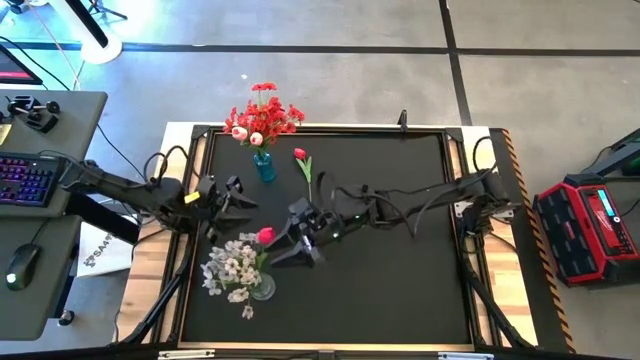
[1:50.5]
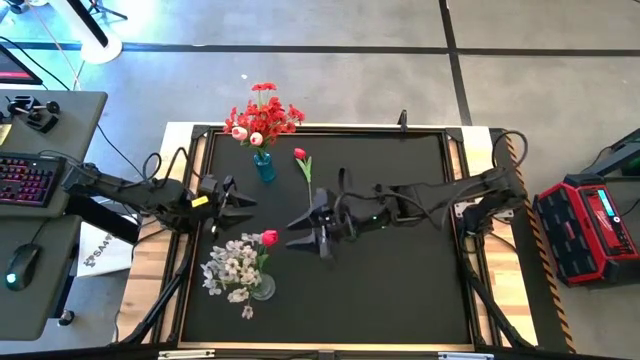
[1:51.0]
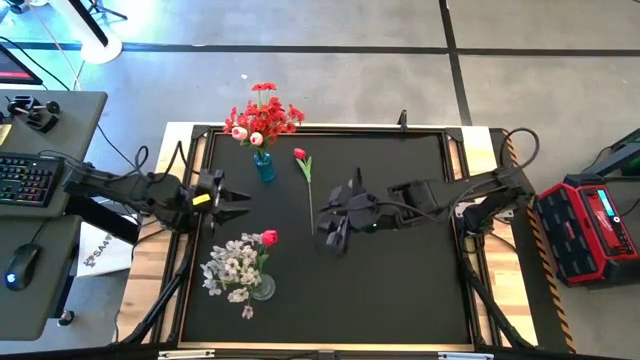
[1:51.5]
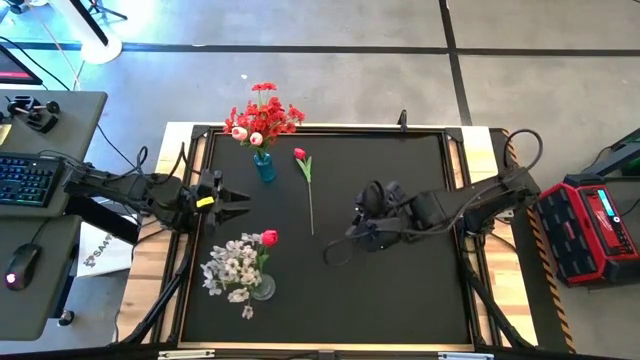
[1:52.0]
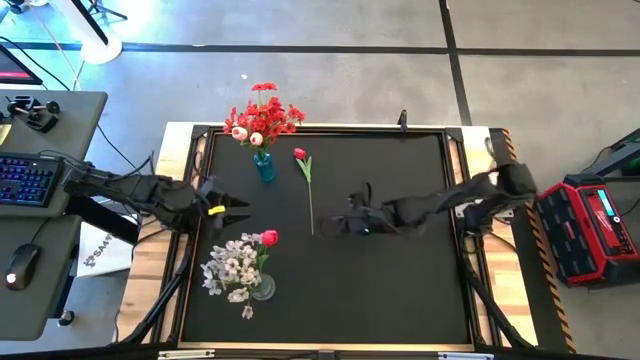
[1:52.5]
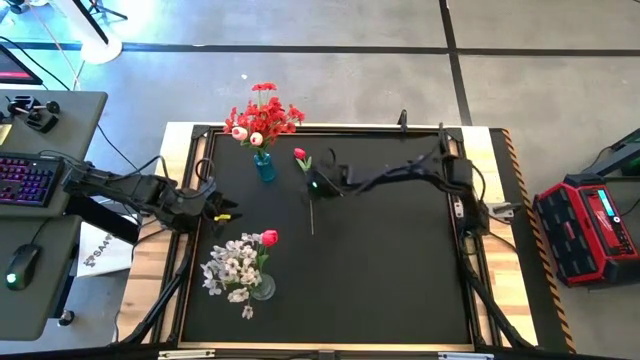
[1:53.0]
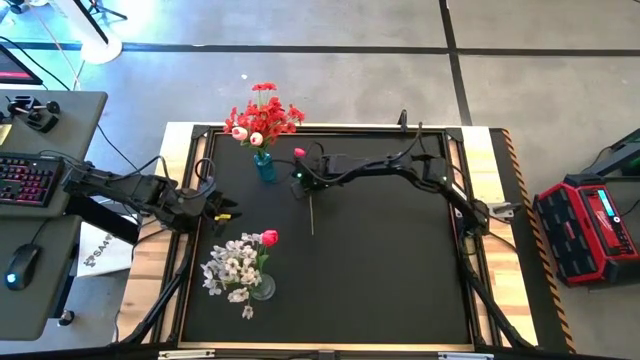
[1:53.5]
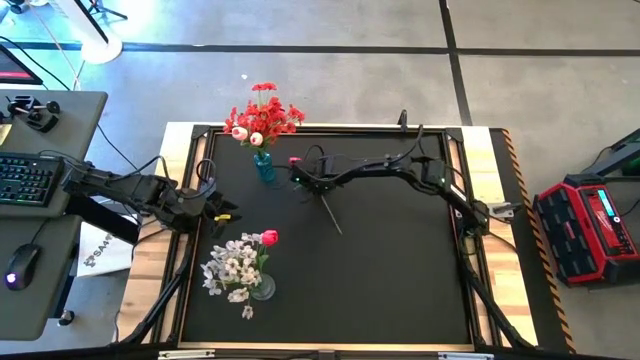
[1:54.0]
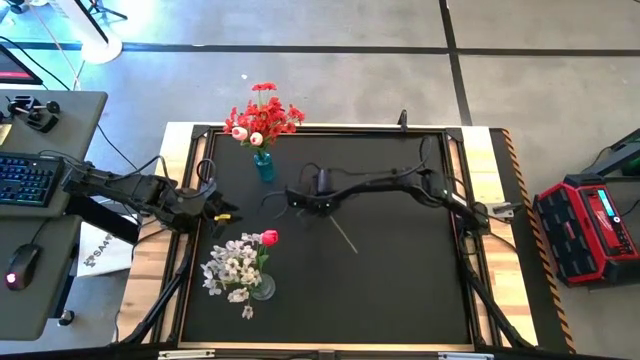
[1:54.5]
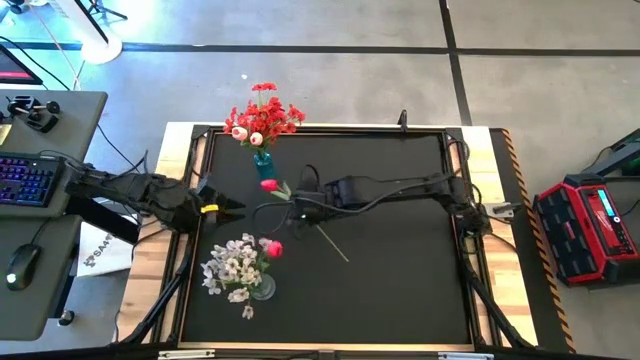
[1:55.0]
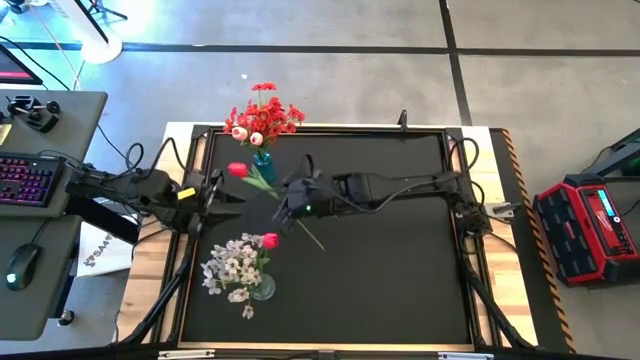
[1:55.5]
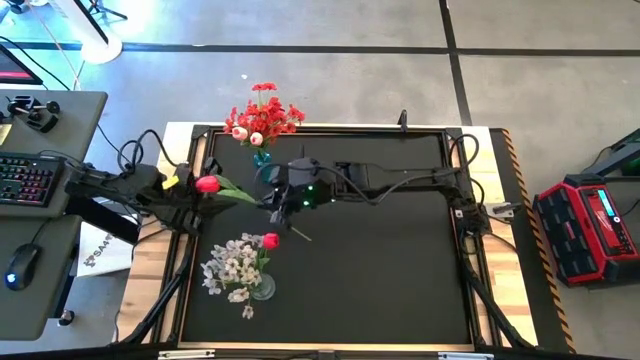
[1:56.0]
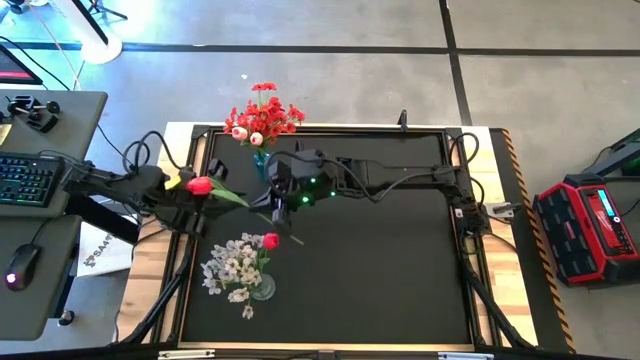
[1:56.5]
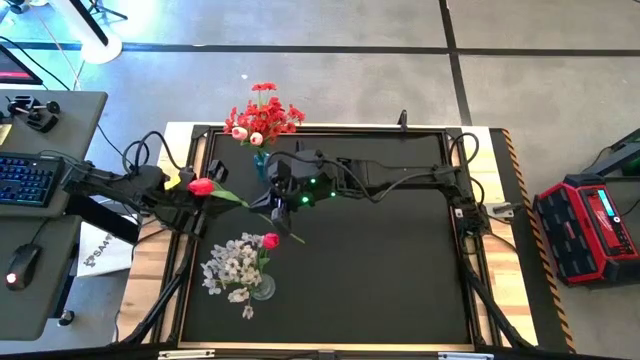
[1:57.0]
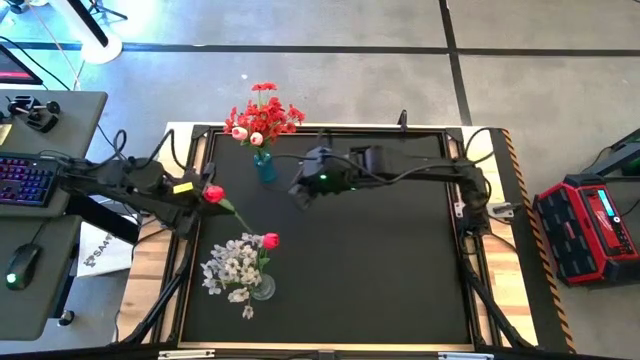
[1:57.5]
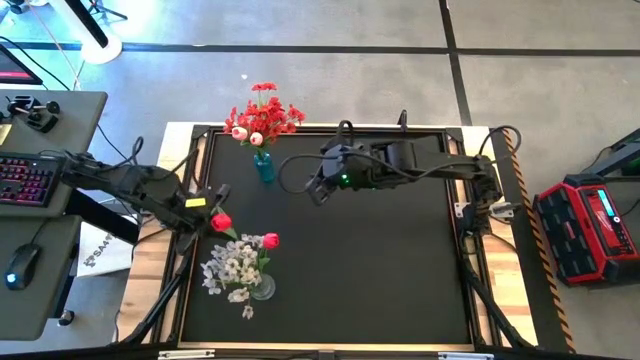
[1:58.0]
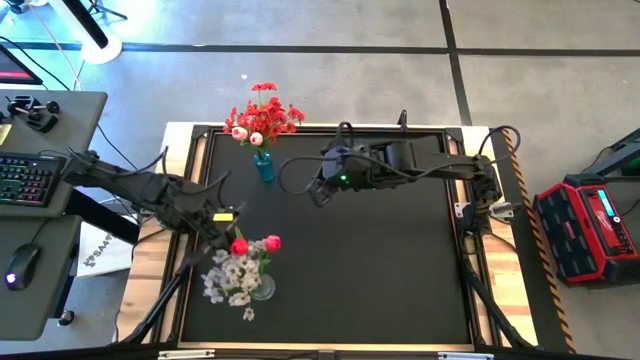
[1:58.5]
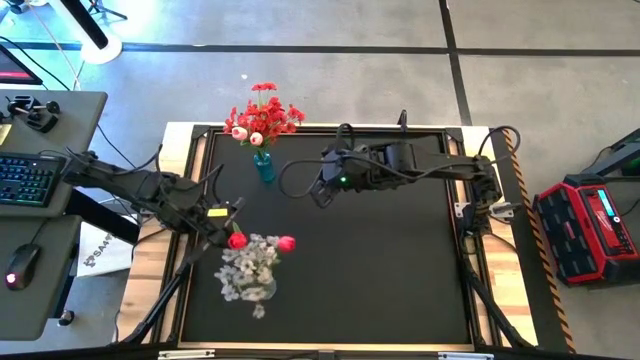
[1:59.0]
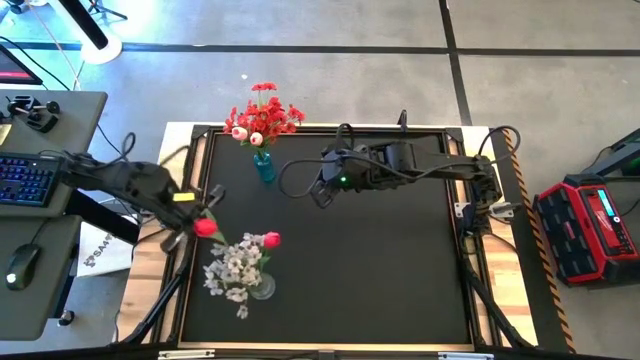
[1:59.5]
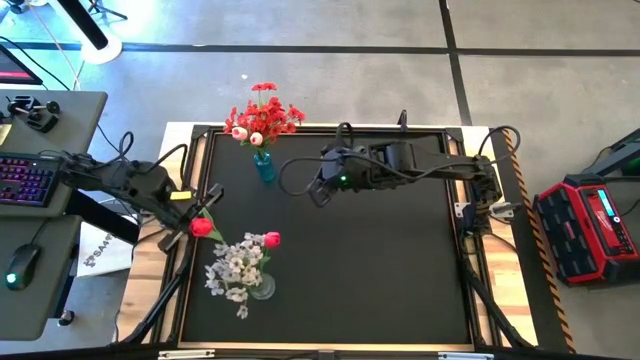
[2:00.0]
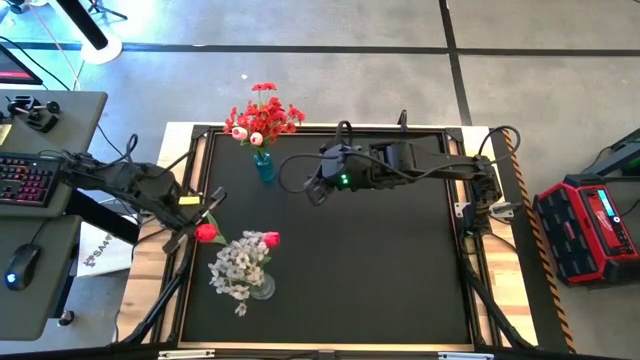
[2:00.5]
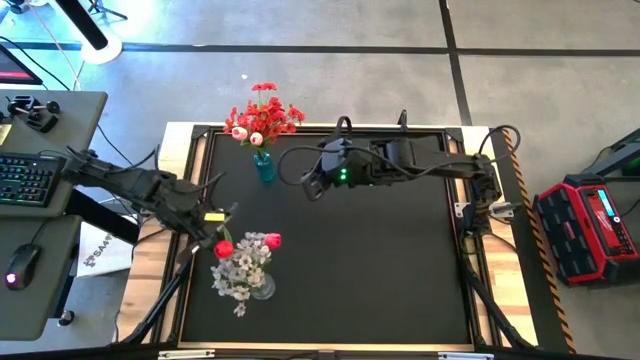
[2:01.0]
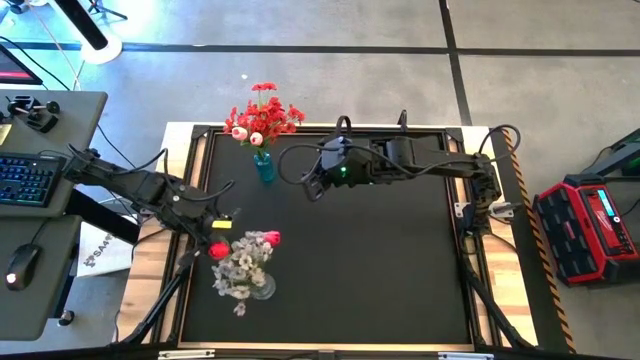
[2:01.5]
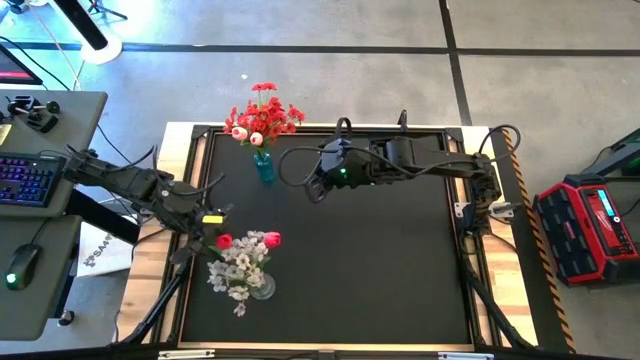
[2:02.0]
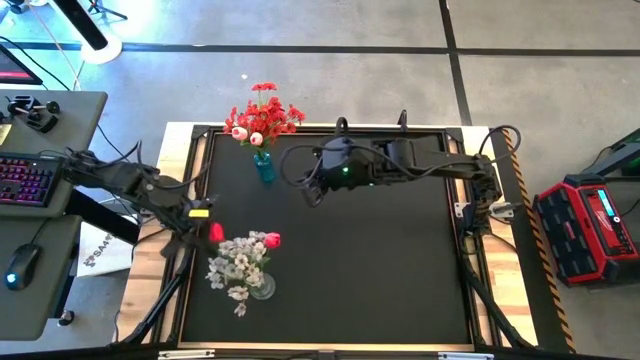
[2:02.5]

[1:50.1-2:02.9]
Task: Sort flowers into vase by color
Put the red flower into the transparent vase

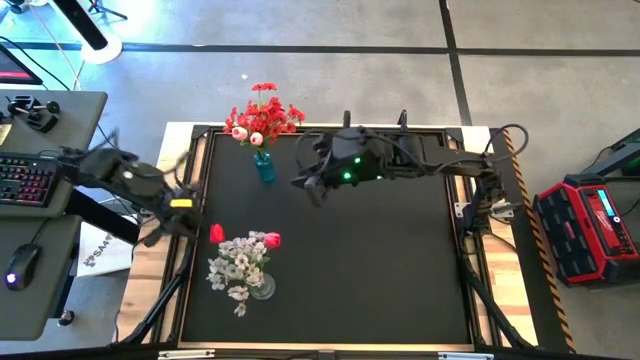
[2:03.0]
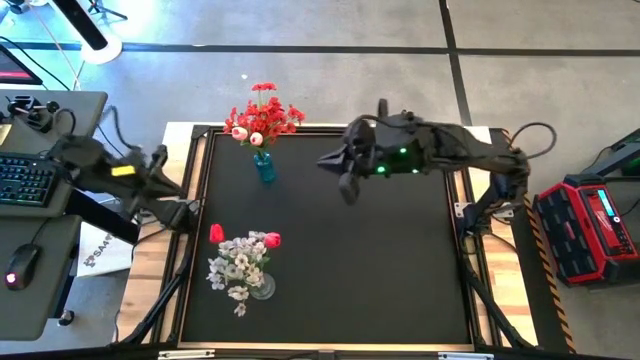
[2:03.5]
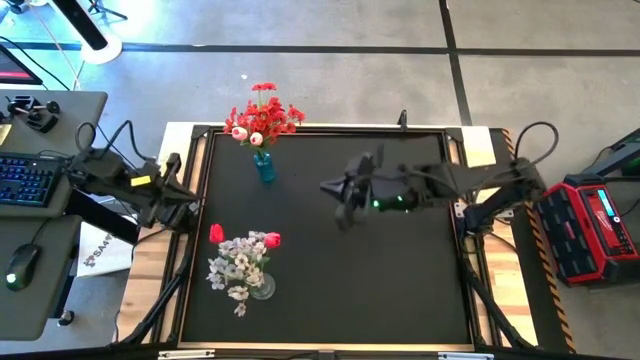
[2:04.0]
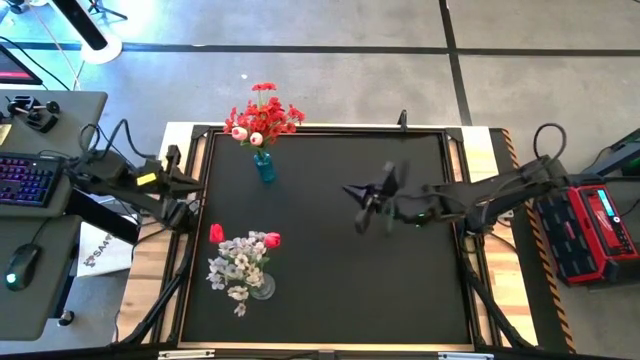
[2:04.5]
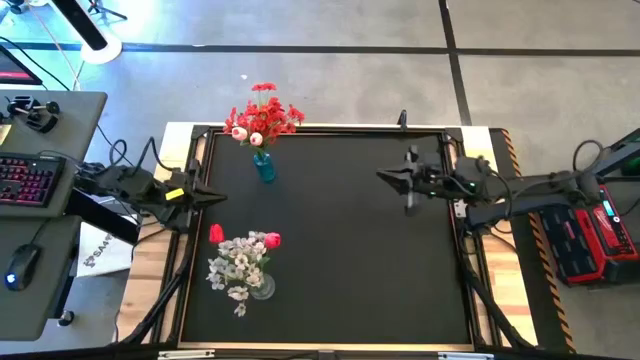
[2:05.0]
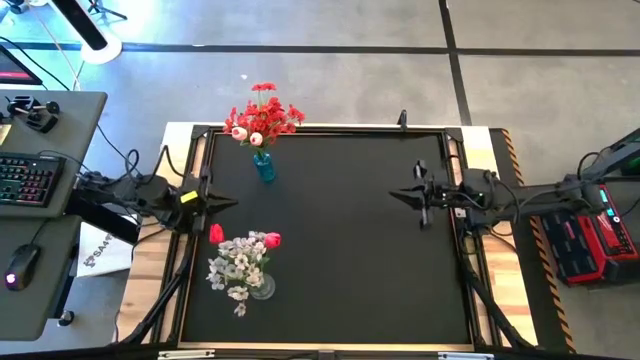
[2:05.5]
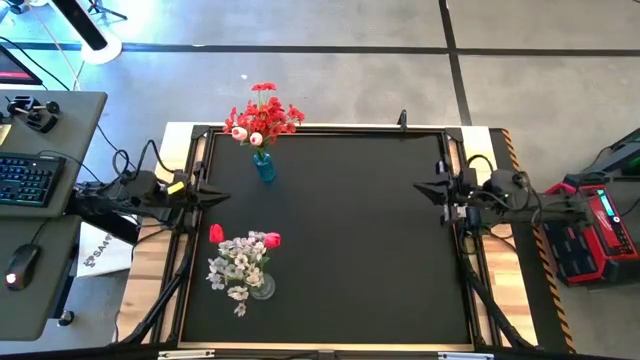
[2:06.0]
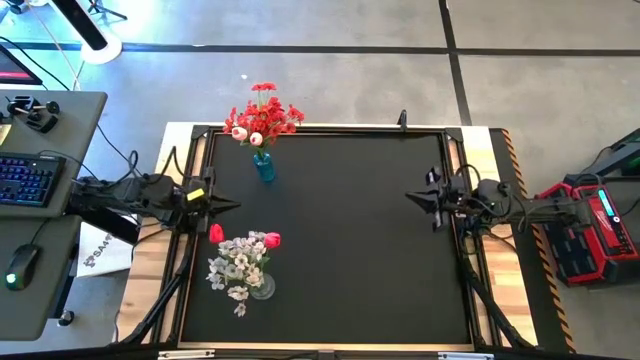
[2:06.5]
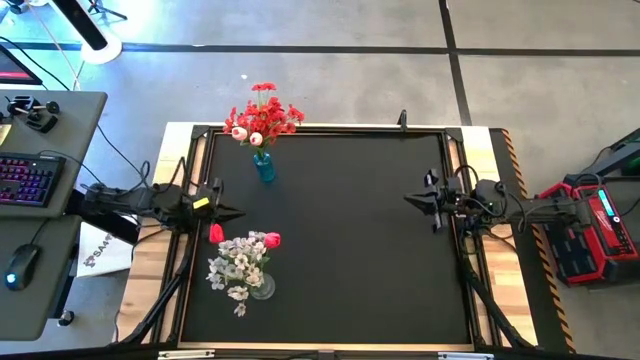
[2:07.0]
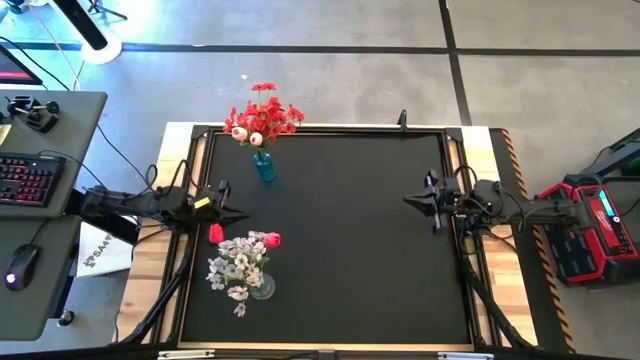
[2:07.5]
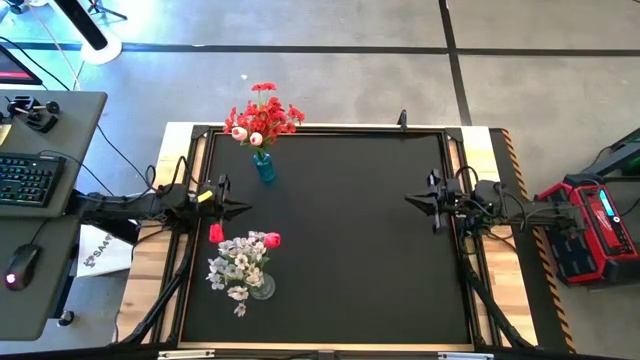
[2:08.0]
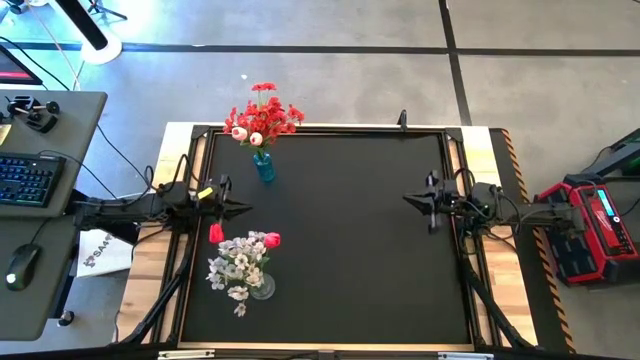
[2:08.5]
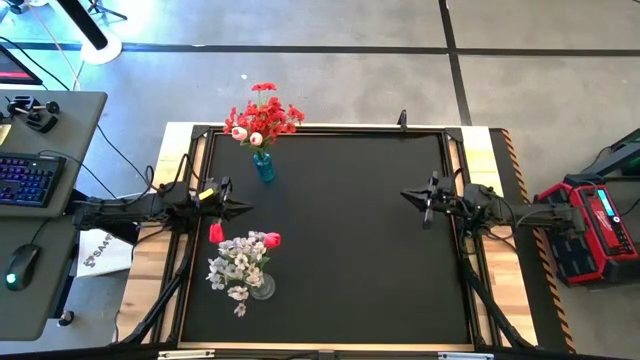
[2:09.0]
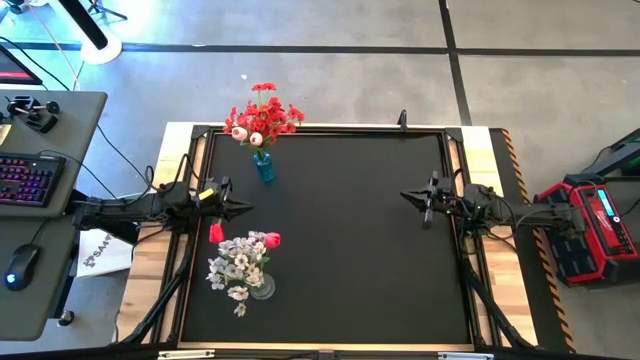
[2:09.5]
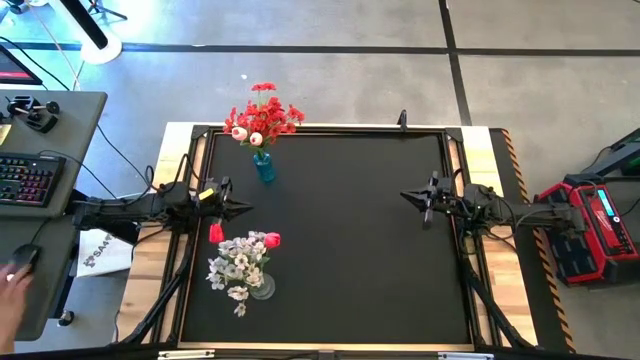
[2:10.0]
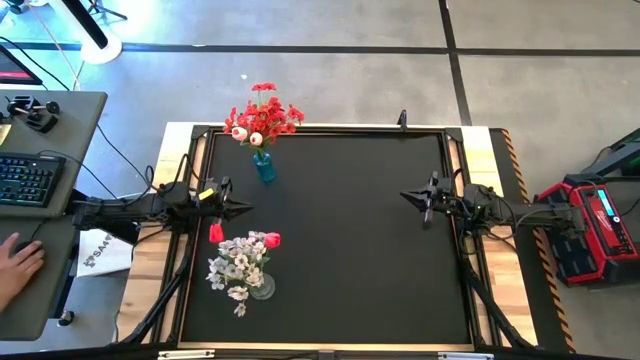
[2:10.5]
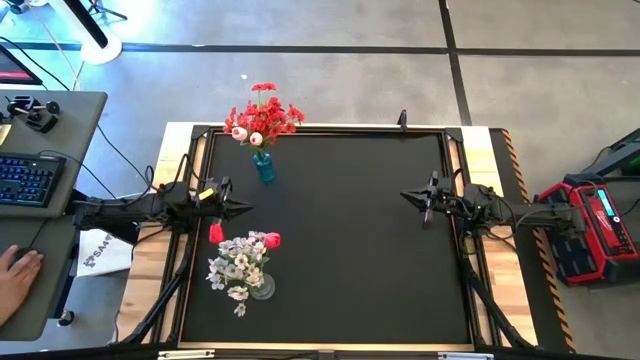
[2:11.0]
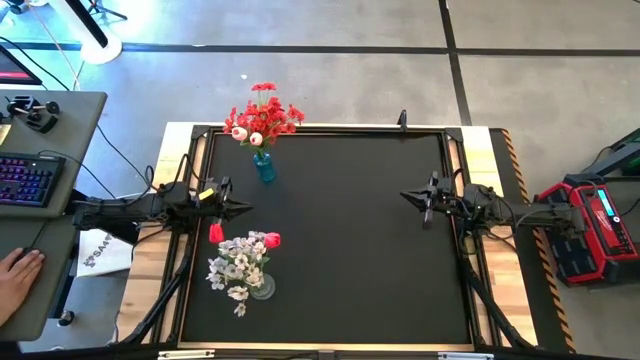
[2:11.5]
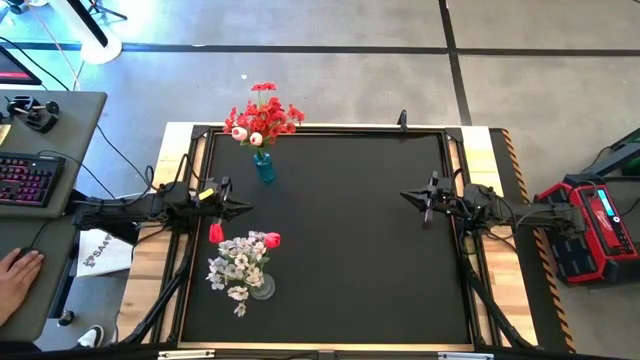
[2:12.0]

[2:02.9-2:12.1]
Return to Home Position
